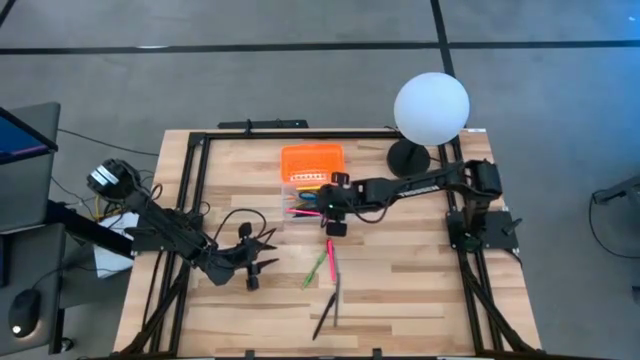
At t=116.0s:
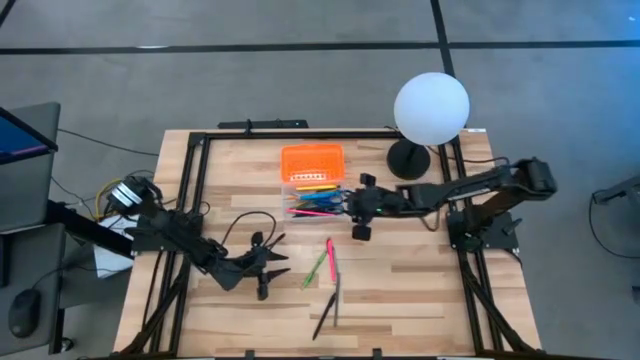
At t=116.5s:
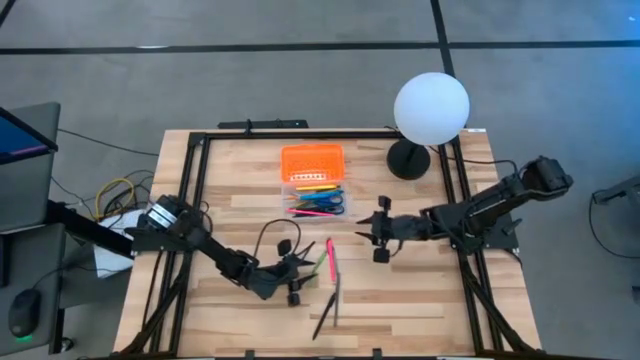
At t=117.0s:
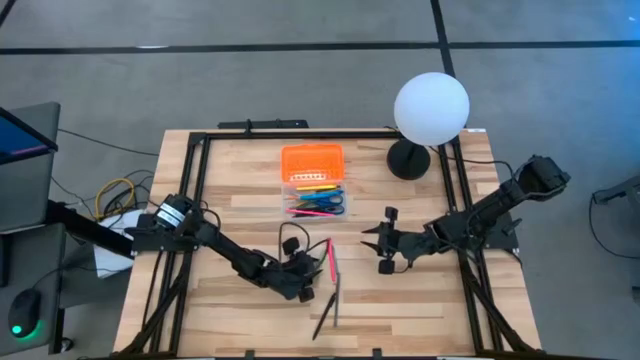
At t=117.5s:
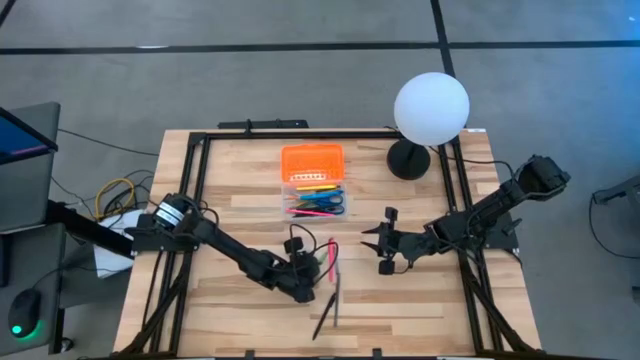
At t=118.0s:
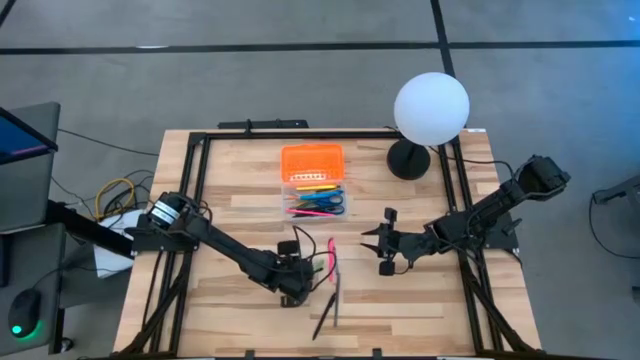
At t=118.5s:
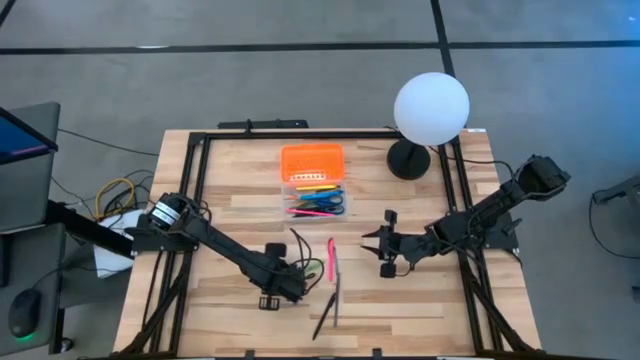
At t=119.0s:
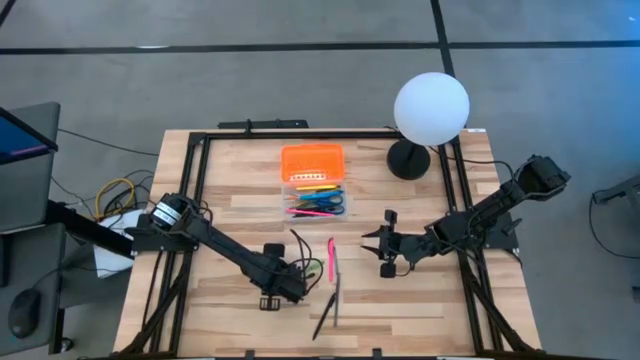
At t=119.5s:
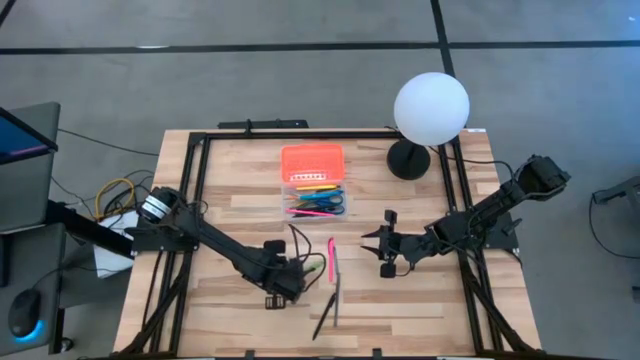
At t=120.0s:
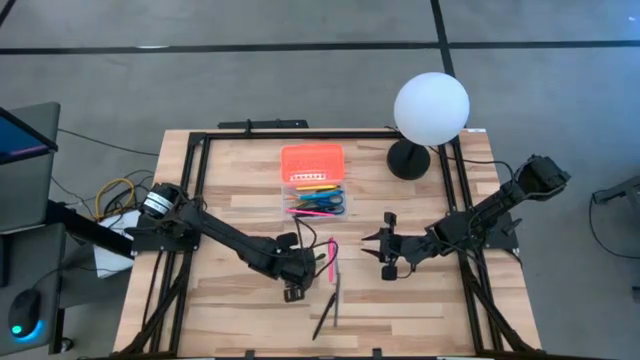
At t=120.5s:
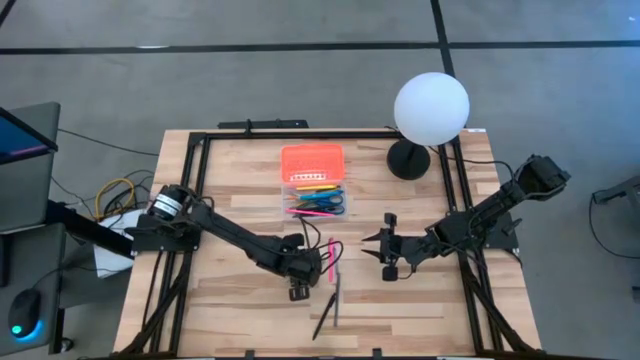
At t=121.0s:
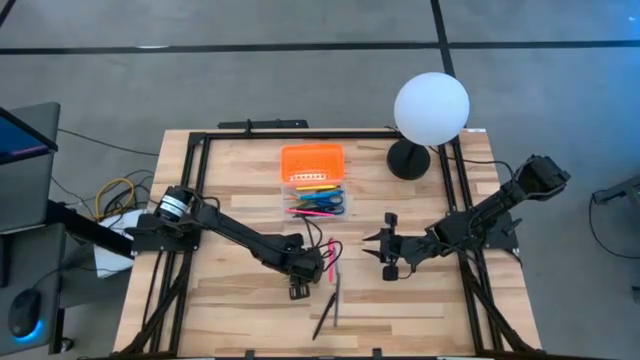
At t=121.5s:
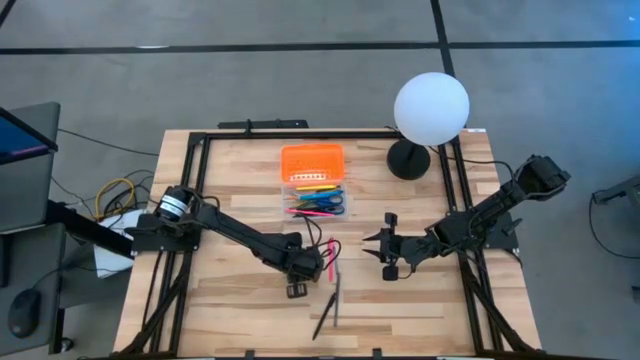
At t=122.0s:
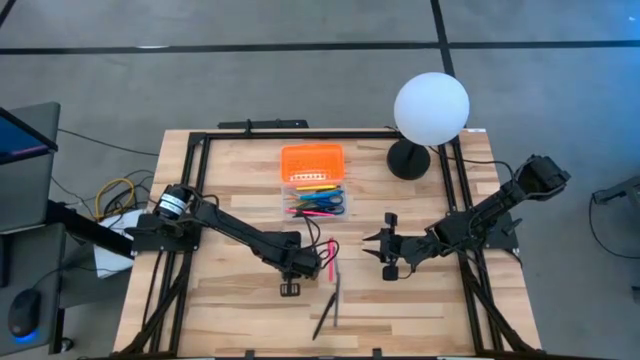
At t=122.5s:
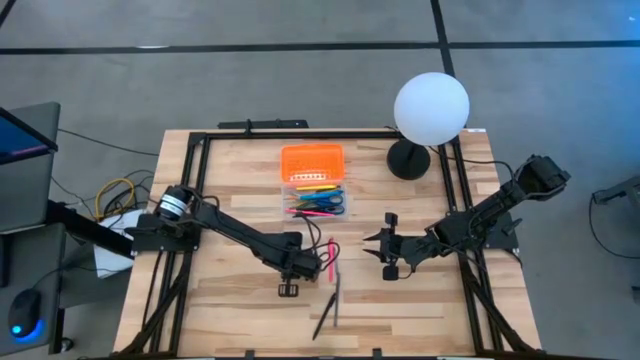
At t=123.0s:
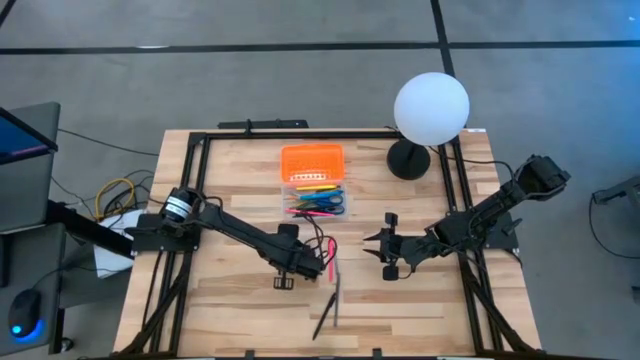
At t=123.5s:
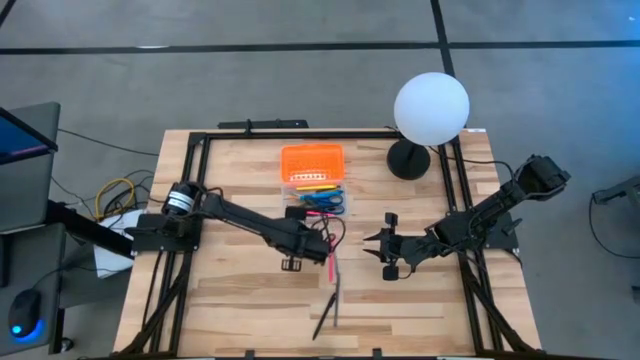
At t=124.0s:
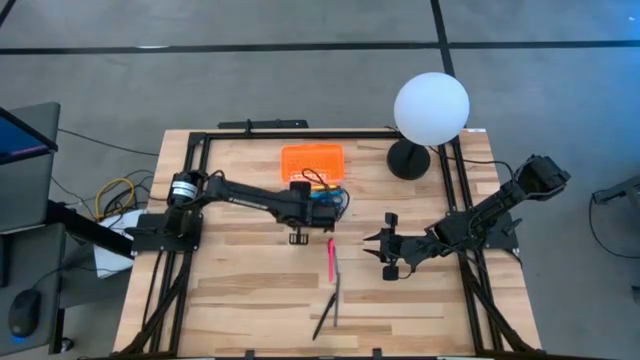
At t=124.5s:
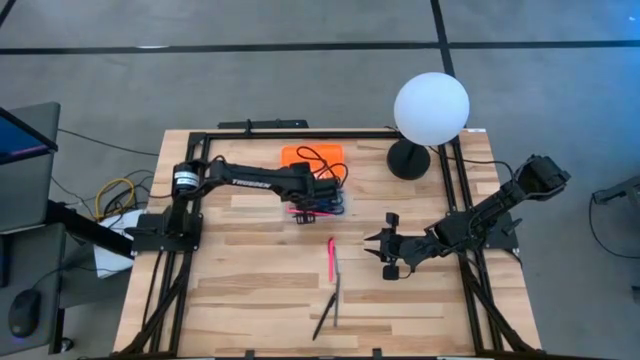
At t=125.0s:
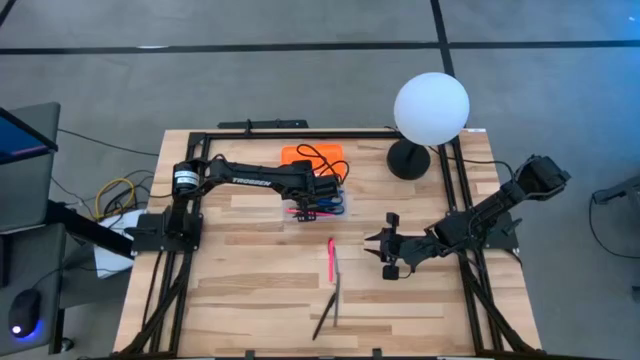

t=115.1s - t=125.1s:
Task: Pick & place school supplies into a supply box
Put the green pen into the supply box

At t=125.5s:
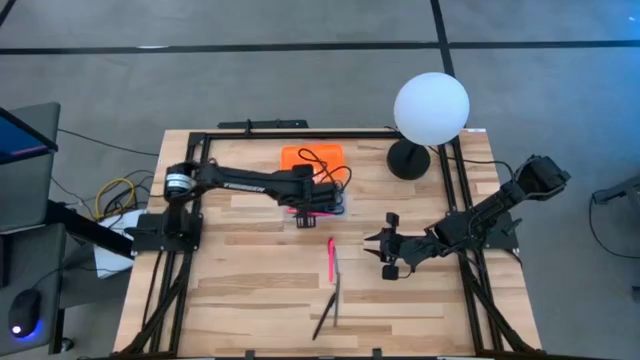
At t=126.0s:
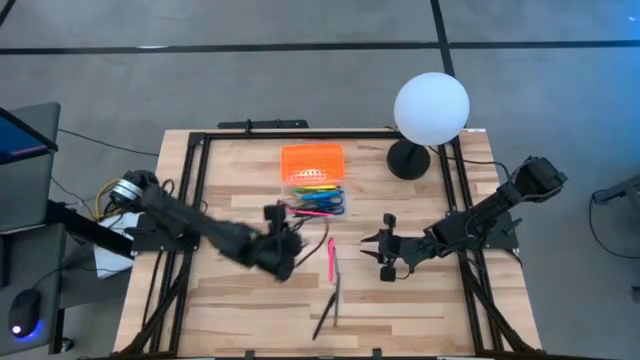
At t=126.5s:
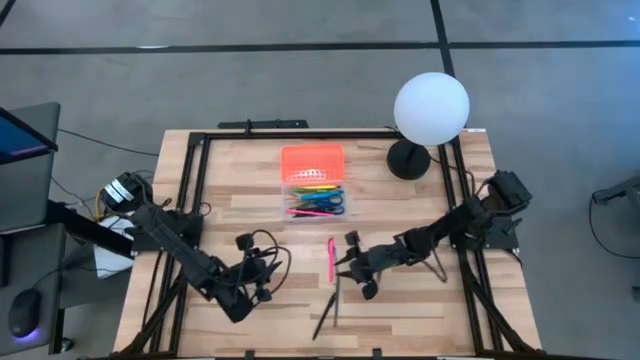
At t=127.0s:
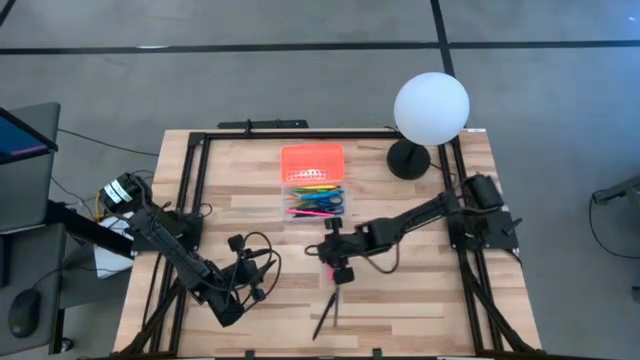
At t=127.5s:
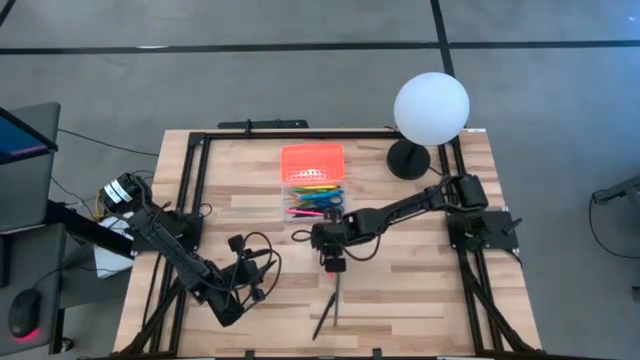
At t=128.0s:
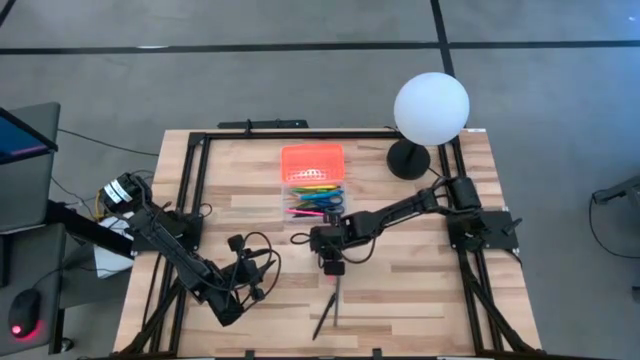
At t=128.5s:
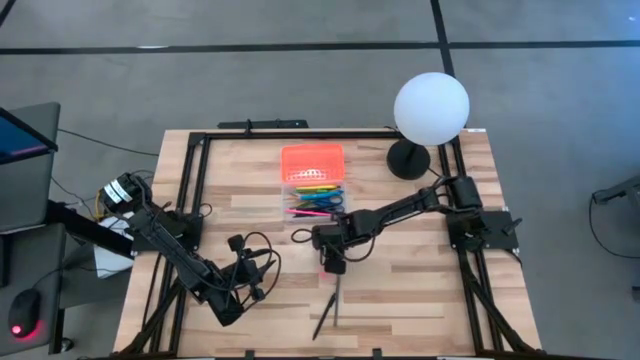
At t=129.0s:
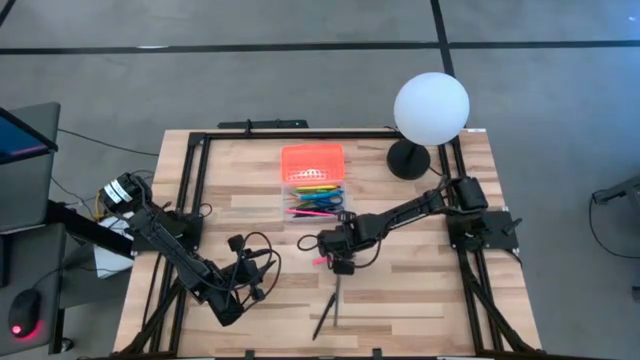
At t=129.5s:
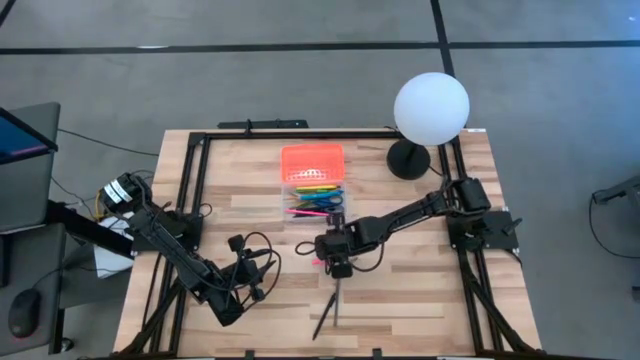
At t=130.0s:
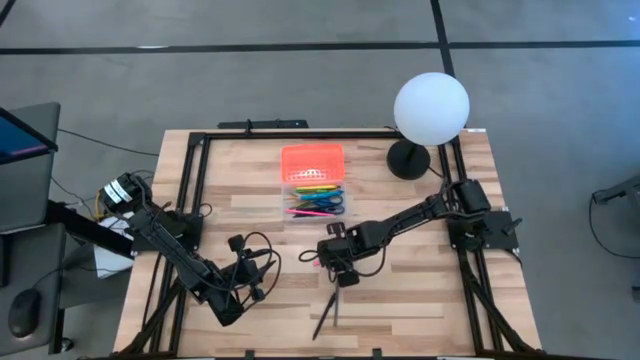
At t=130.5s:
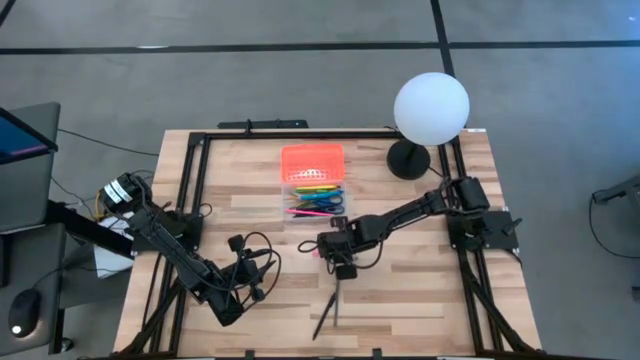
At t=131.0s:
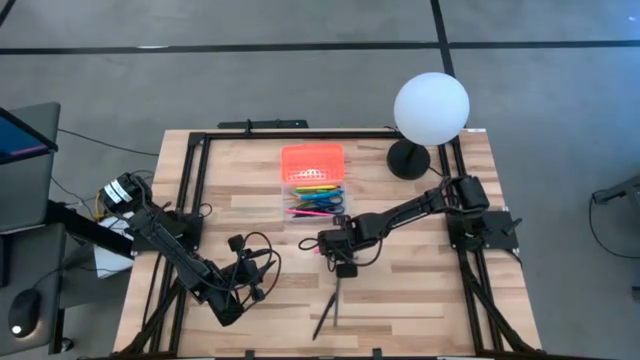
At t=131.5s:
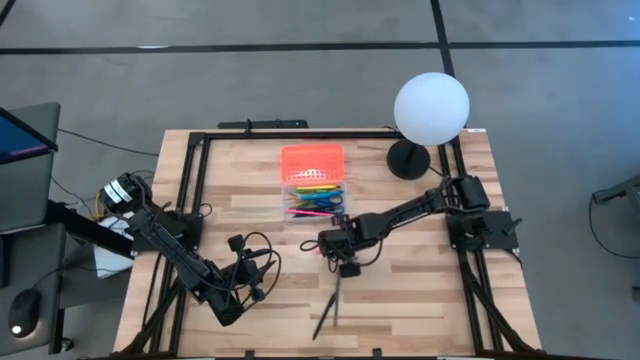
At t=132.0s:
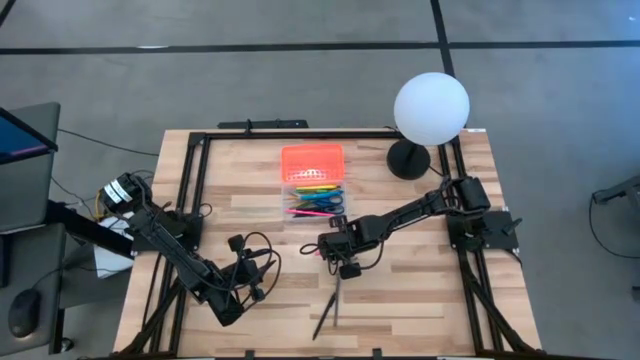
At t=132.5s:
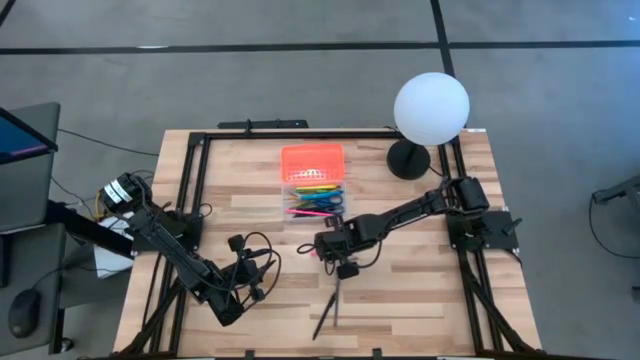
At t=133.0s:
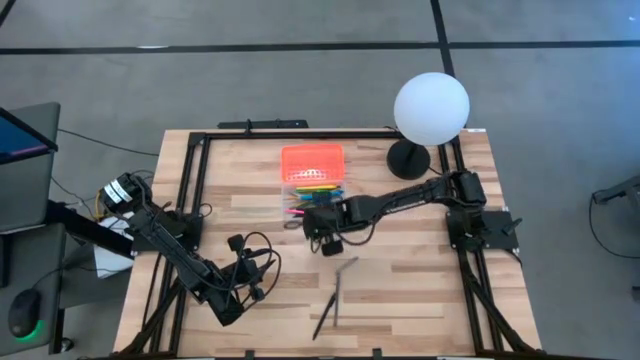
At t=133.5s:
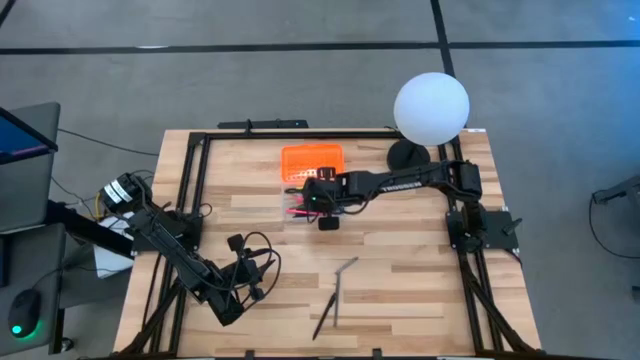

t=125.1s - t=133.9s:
Put the pink pen into the supply box

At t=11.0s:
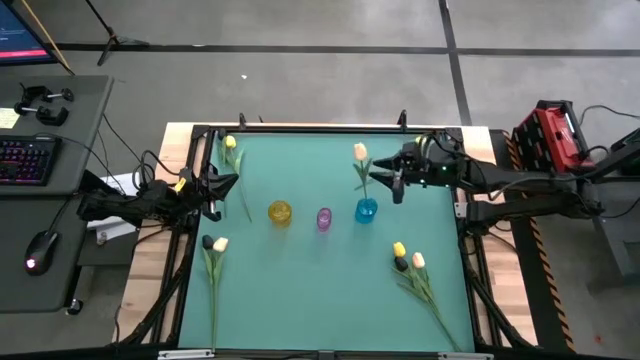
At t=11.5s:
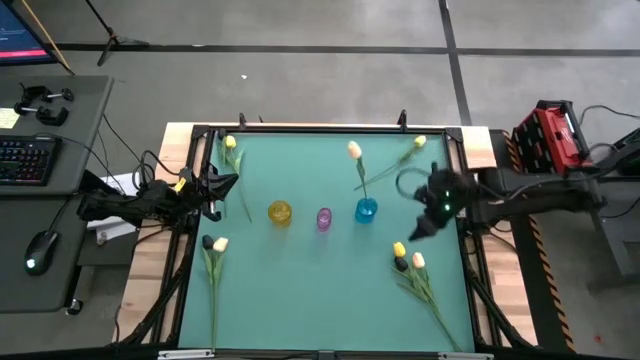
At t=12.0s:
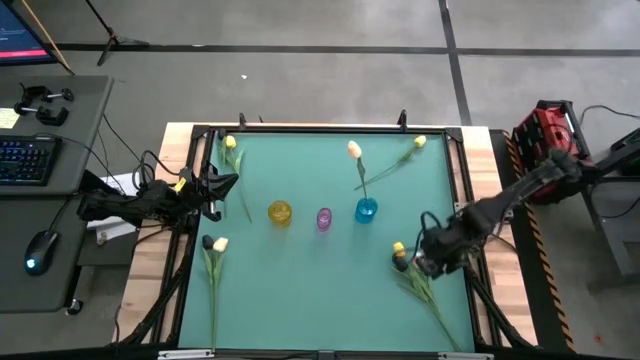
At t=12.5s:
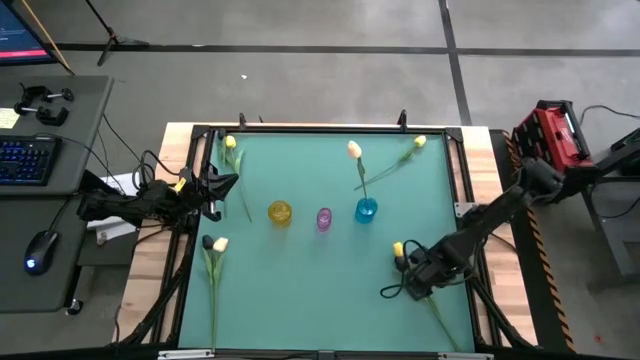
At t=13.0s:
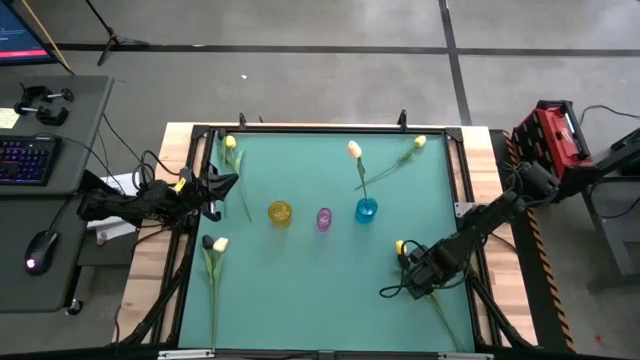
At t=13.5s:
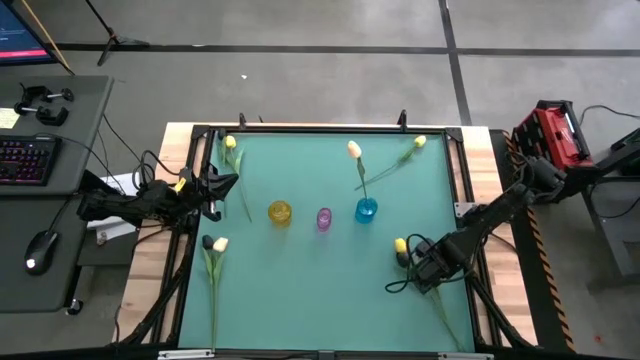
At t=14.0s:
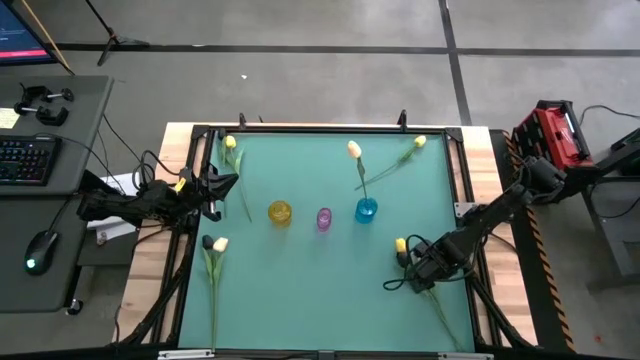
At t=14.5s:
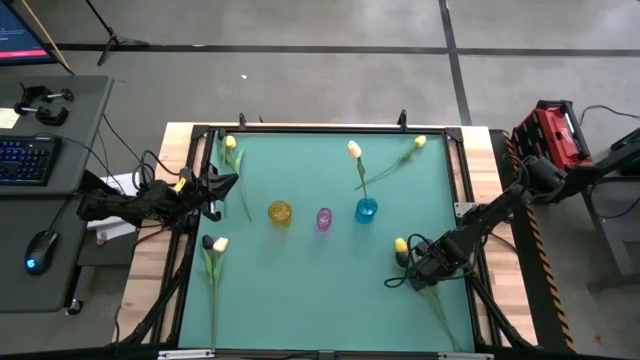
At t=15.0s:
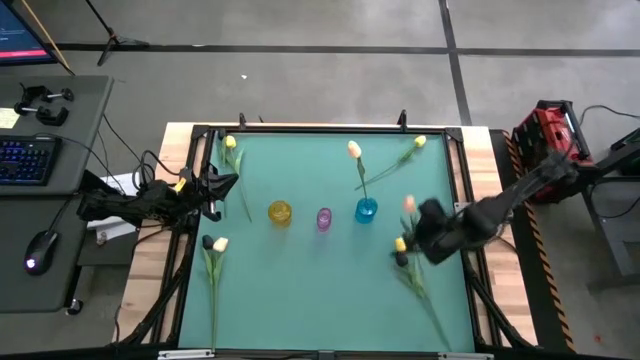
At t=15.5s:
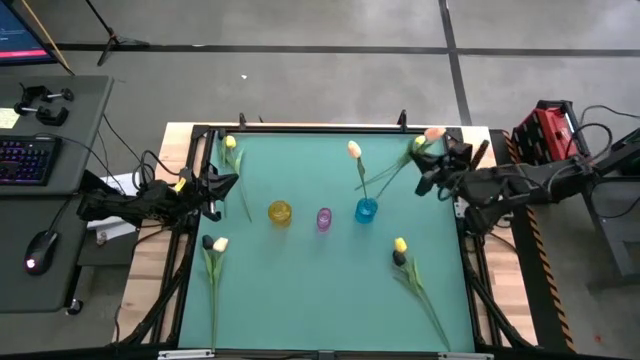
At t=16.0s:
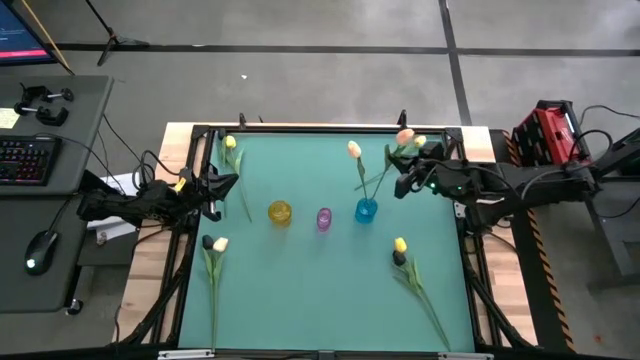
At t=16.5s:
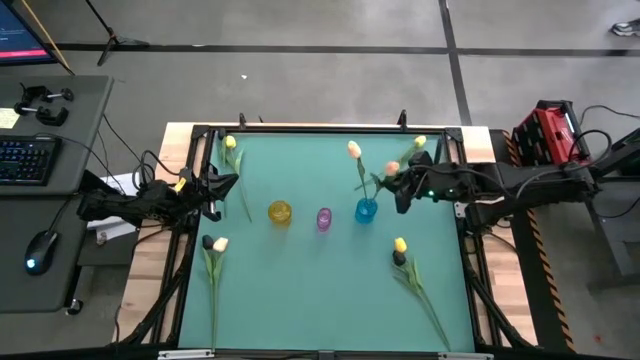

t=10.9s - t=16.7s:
Task: Sort flowers into vase by color
Put the right light orange tulip into the blue flower vase
